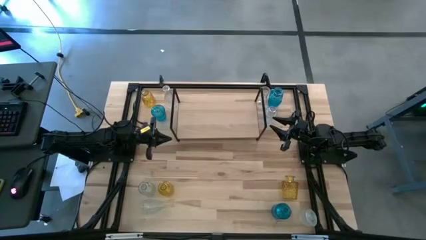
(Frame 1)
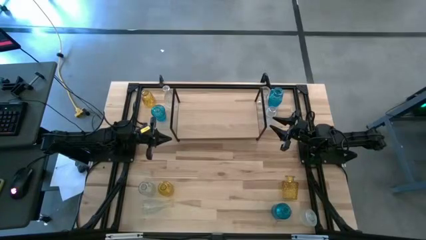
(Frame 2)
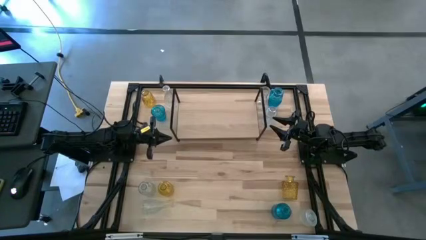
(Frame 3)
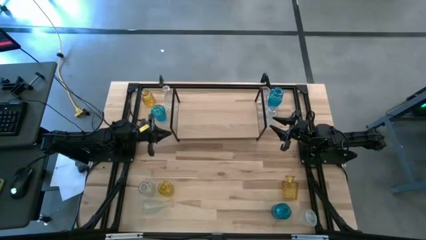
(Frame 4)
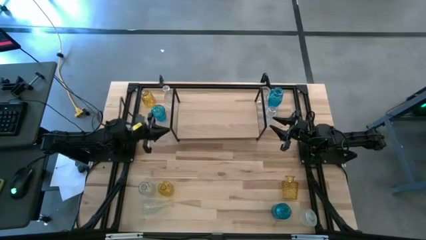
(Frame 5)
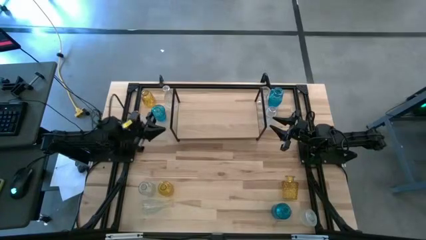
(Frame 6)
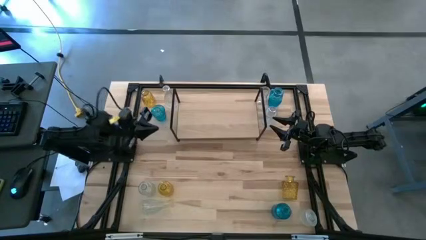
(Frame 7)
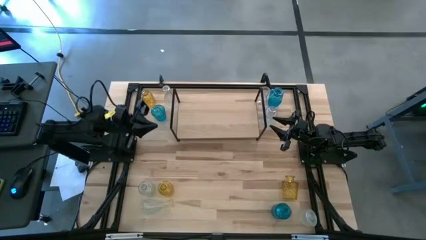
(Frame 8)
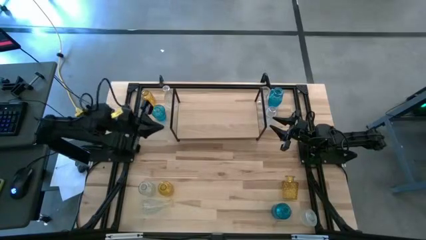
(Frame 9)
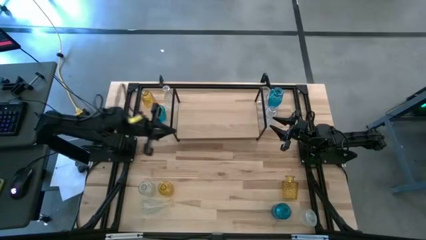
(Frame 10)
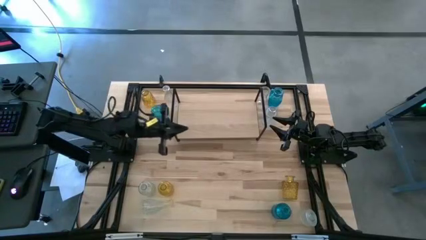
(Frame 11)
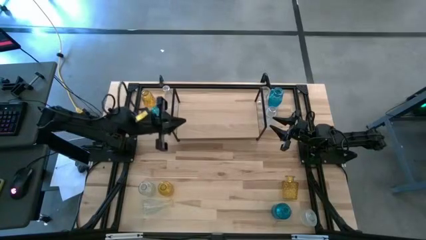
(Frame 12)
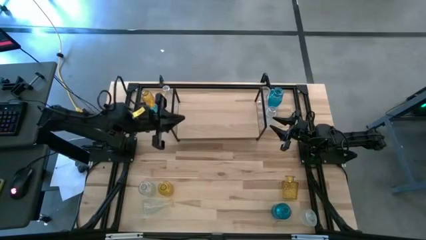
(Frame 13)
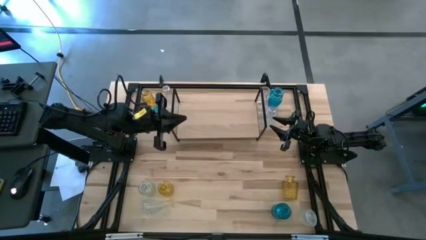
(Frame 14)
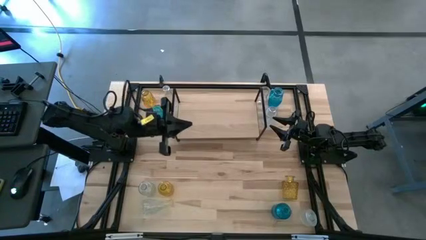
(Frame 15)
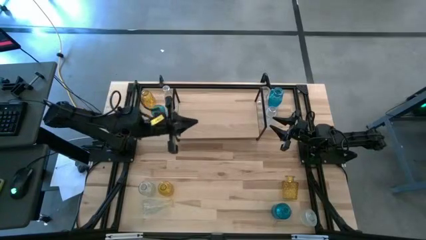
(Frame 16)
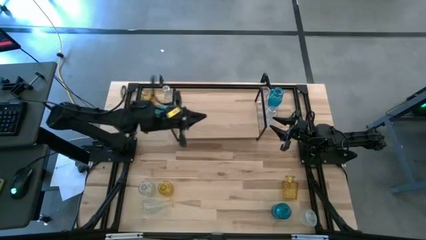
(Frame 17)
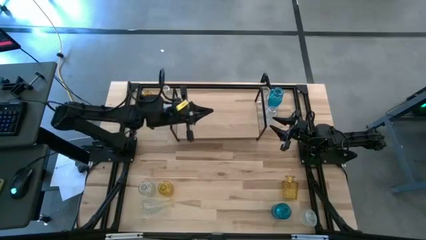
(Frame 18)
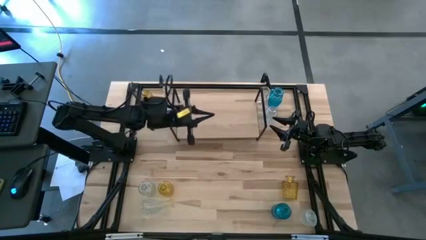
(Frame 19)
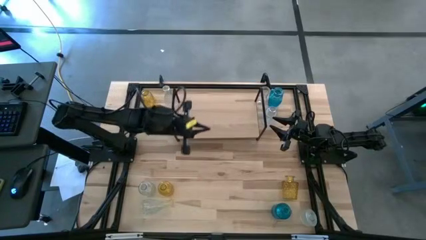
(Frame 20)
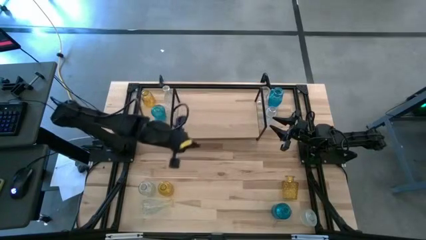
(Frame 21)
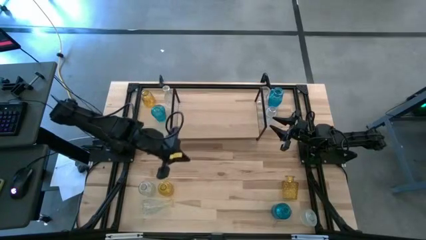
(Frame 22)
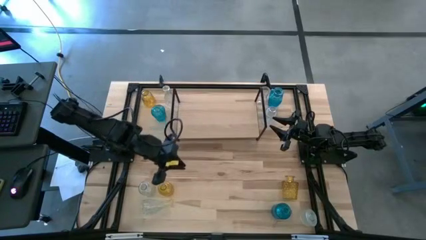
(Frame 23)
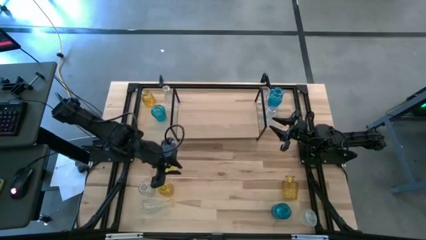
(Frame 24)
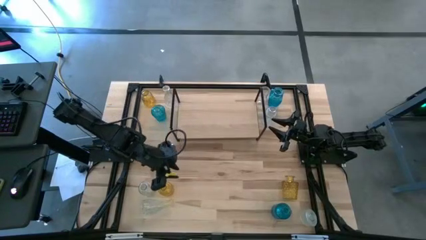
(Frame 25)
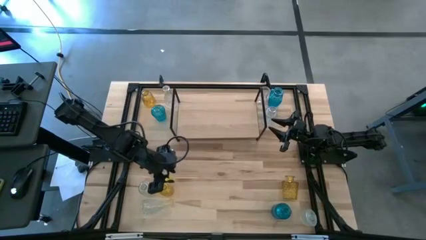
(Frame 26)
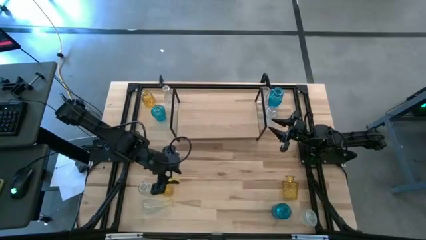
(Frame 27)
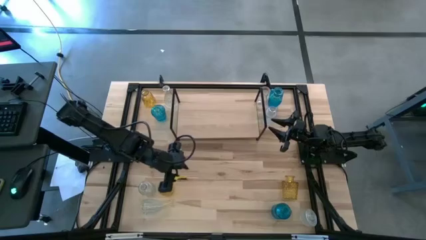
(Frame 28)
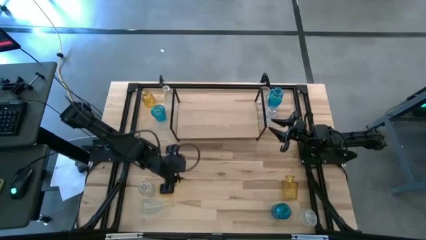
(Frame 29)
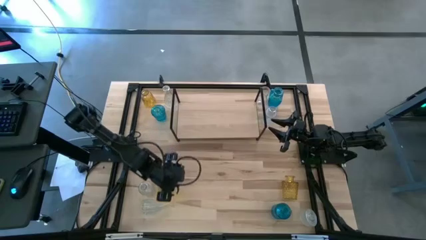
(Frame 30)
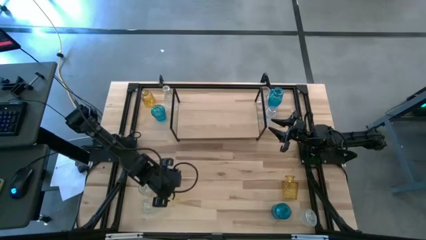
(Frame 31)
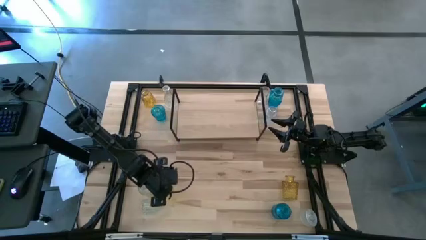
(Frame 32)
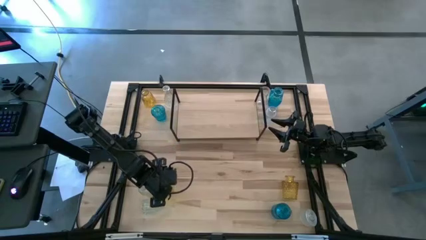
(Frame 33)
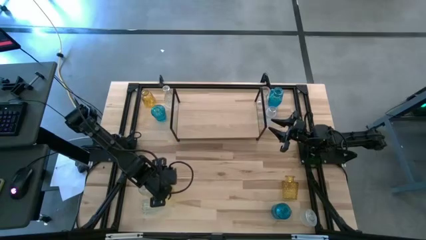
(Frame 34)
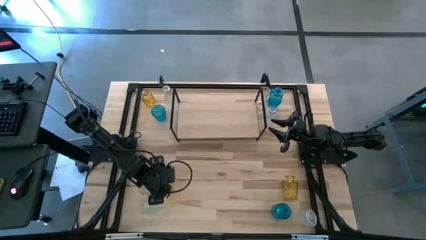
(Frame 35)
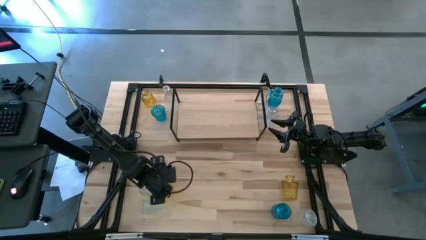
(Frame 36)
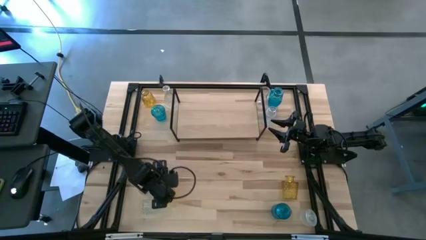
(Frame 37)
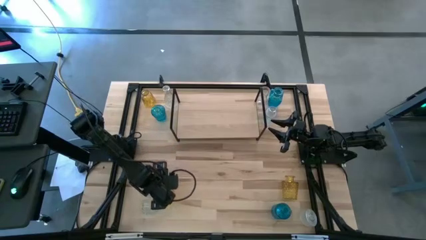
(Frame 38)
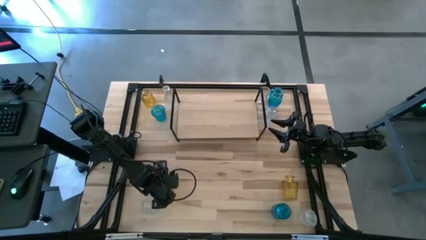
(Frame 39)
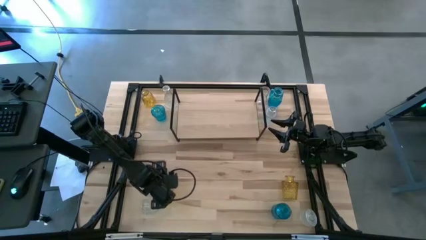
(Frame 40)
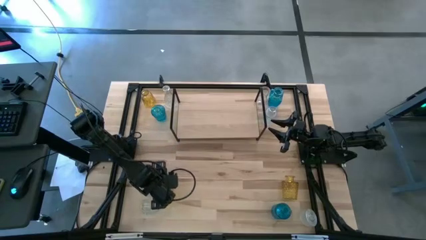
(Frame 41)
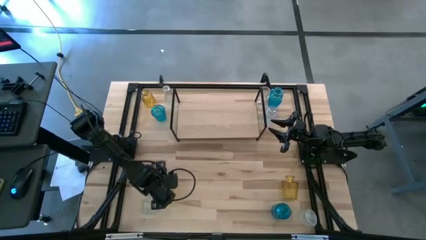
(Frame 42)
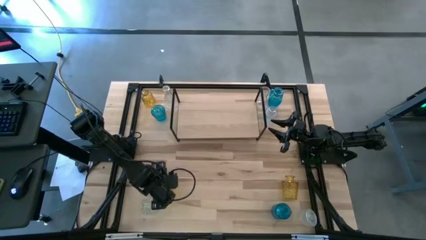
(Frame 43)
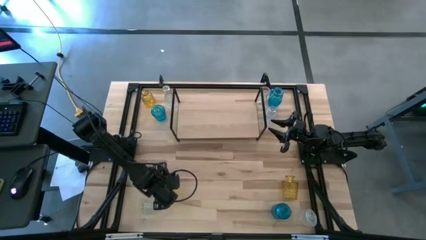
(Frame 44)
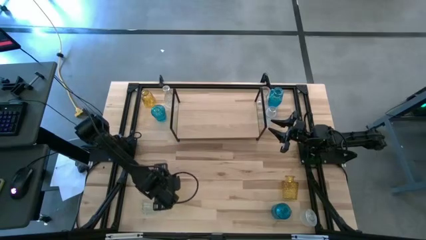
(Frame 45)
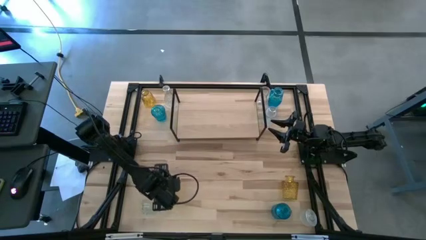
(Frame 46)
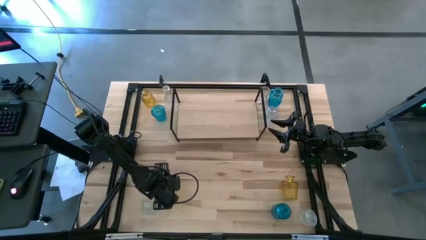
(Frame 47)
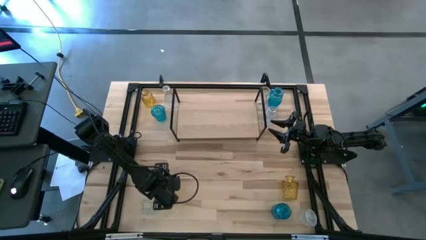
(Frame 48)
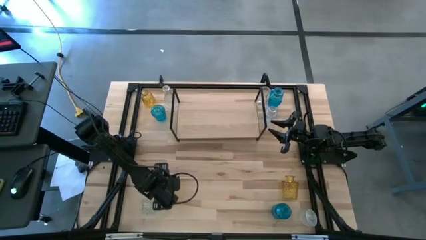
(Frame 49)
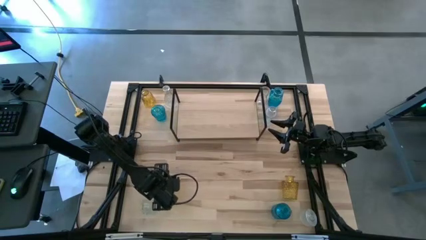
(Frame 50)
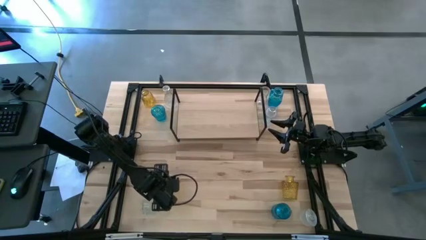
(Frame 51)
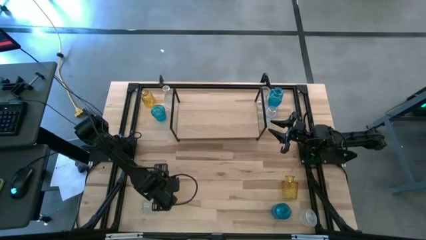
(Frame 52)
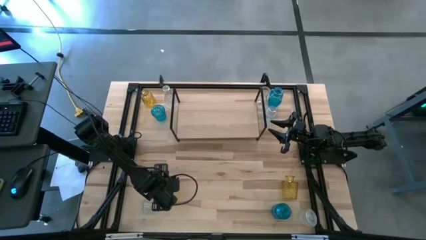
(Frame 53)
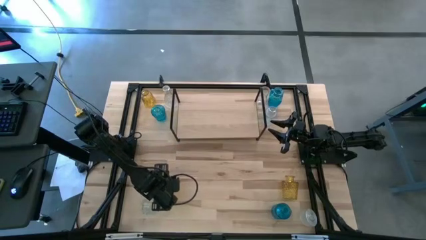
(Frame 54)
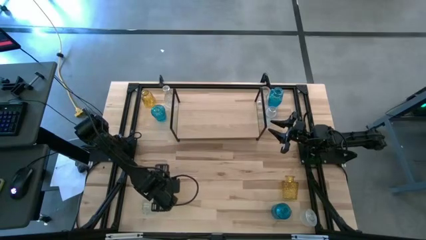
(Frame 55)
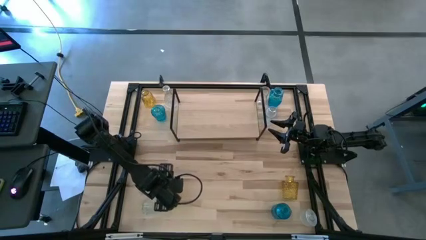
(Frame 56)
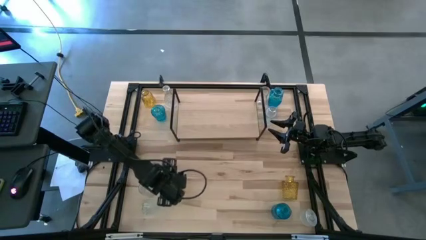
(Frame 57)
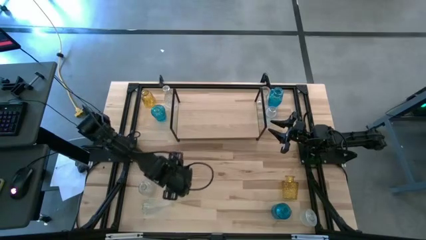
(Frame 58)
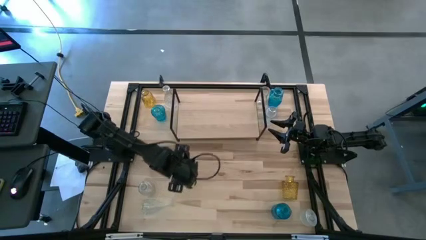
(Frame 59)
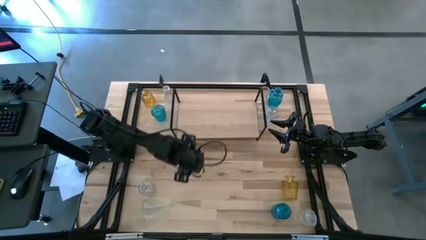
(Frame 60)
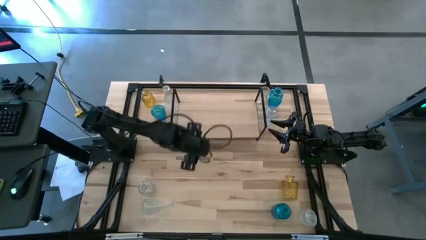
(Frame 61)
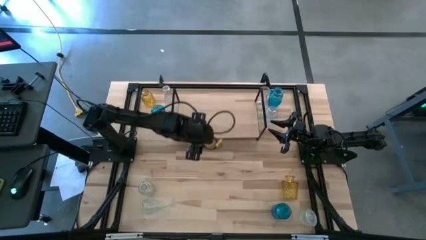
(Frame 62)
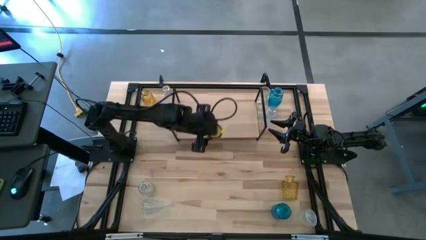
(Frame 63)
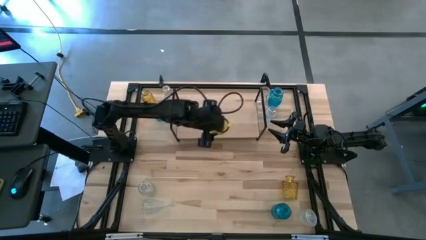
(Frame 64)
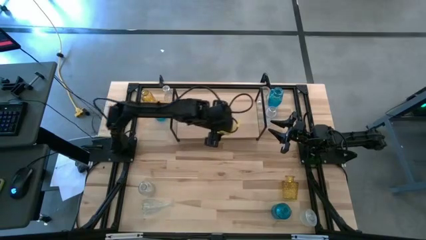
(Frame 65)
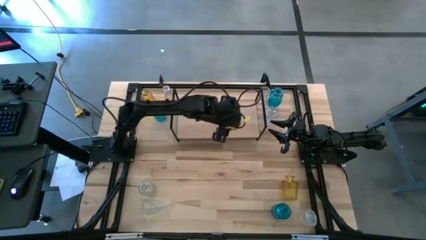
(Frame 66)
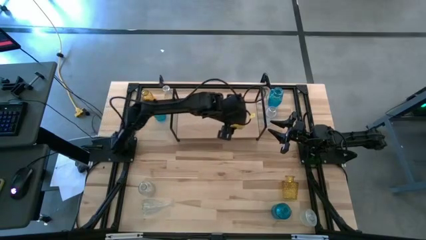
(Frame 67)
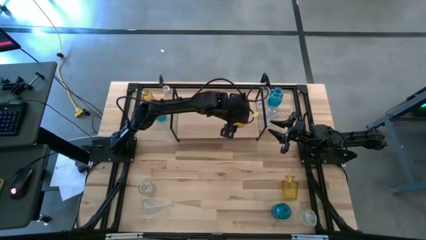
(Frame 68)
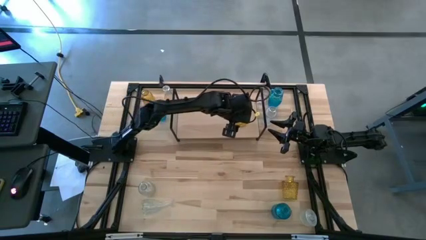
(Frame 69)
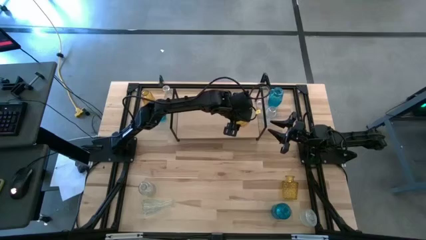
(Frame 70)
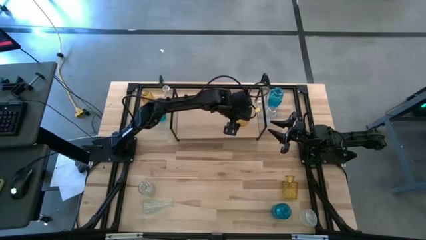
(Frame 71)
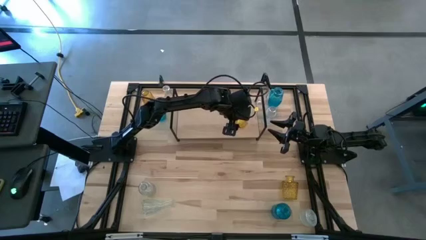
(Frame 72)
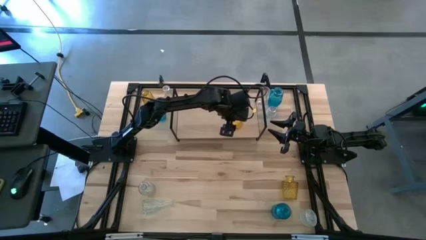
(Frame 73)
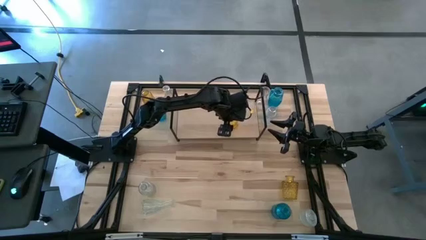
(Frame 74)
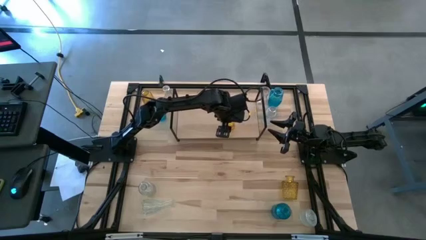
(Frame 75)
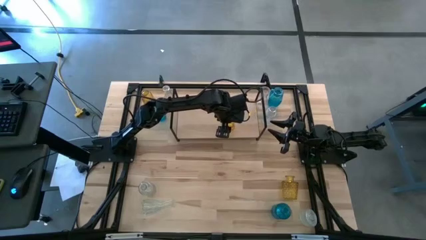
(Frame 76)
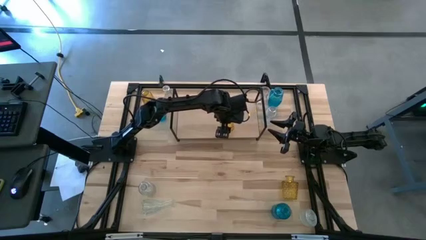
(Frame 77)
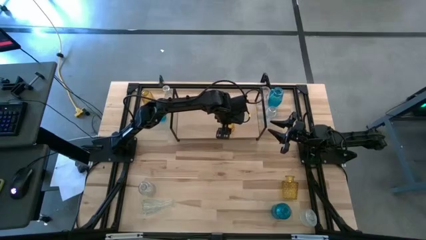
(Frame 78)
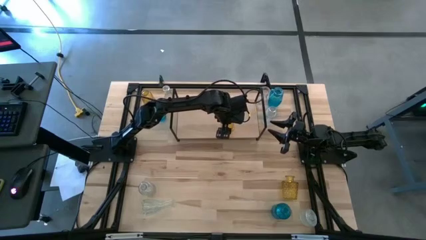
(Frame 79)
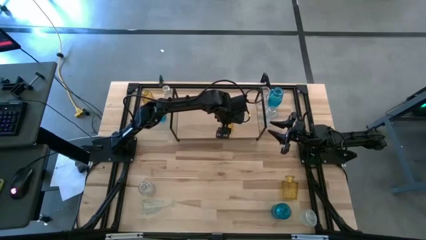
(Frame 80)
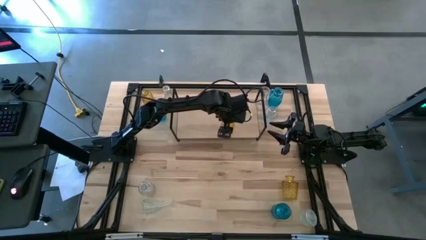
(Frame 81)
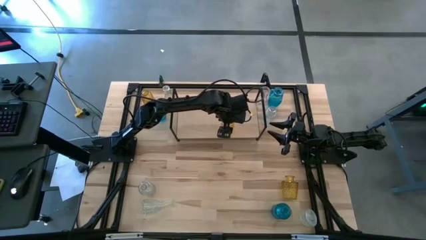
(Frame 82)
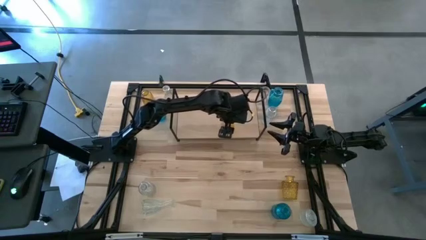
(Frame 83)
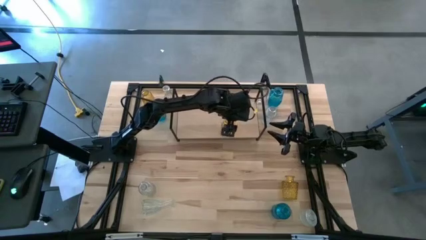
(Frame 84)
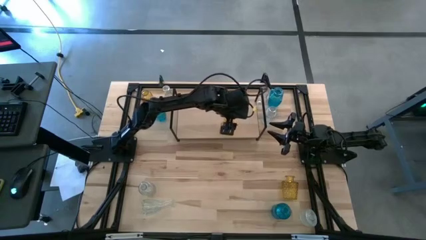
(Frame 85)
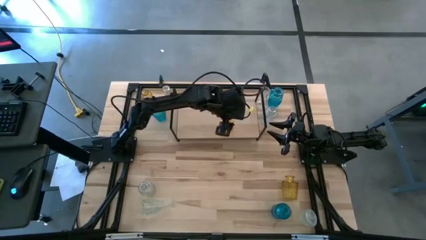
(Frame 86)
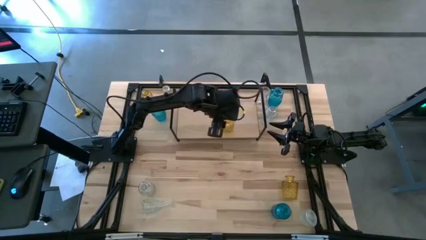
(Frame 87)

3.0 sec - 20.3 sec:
Task: sort vases onto shelf
Put the yellow vase on the shelf
